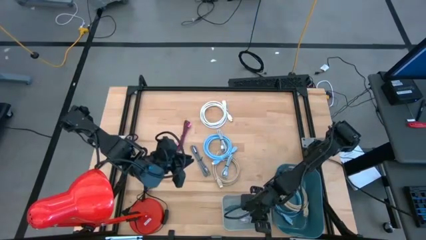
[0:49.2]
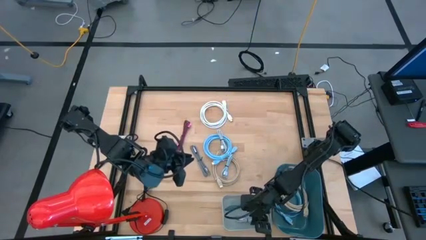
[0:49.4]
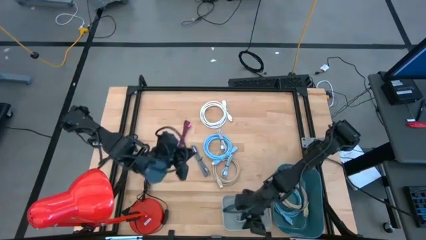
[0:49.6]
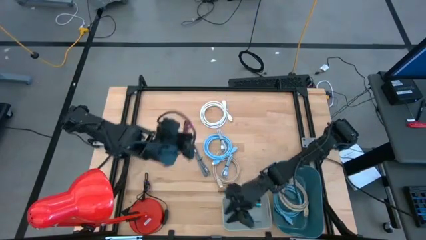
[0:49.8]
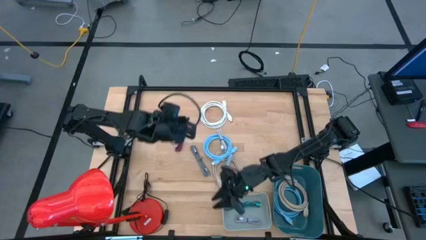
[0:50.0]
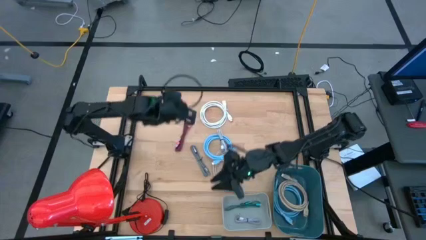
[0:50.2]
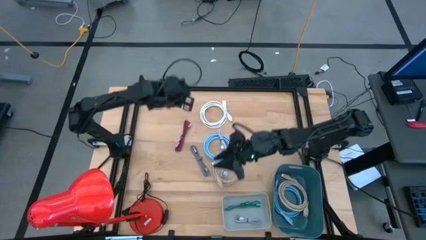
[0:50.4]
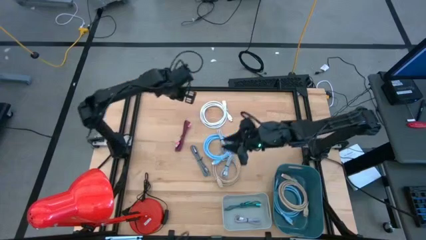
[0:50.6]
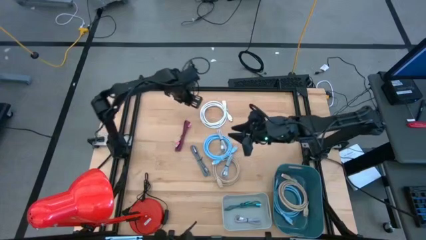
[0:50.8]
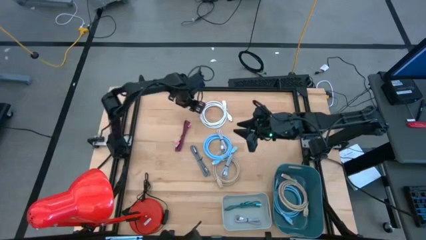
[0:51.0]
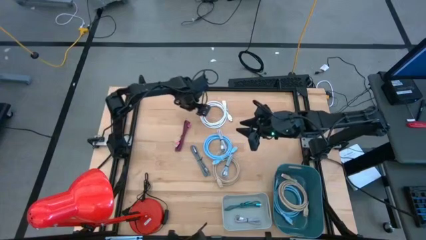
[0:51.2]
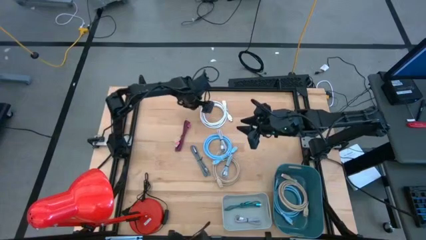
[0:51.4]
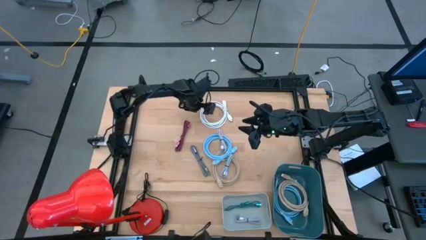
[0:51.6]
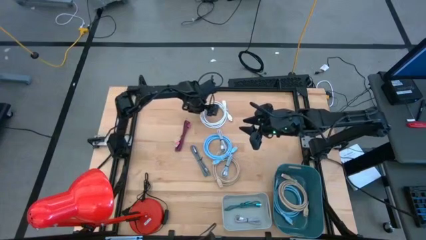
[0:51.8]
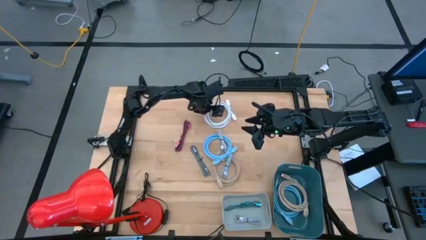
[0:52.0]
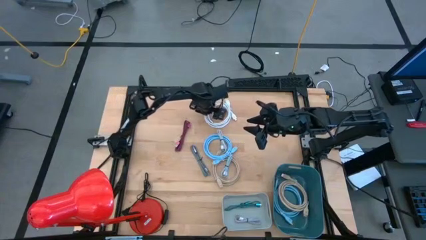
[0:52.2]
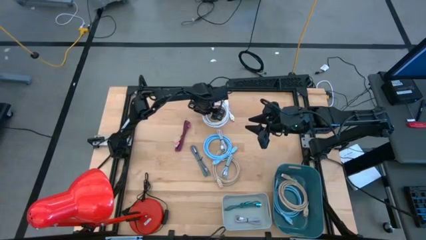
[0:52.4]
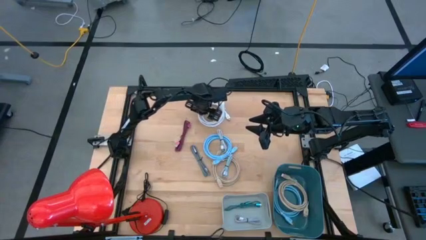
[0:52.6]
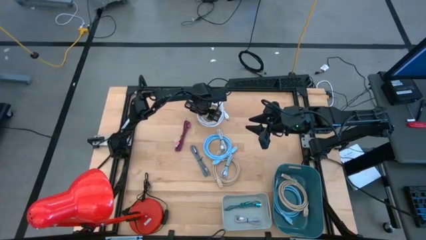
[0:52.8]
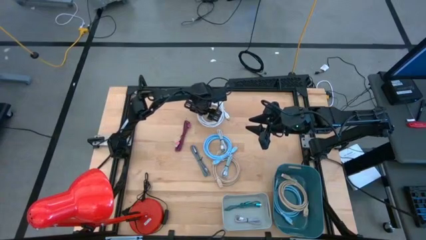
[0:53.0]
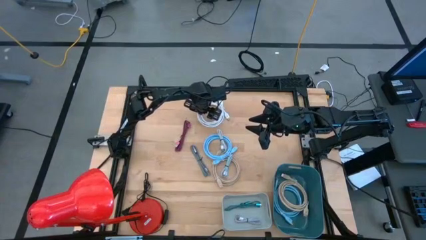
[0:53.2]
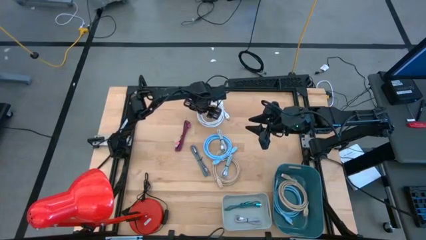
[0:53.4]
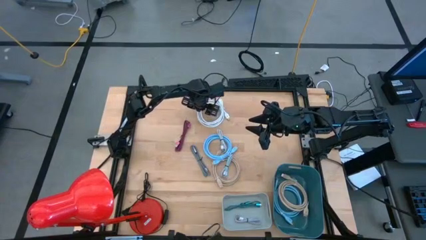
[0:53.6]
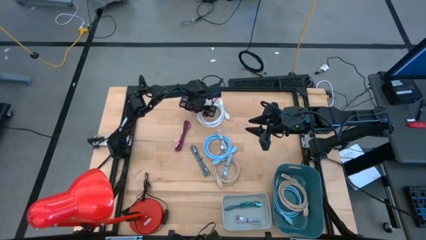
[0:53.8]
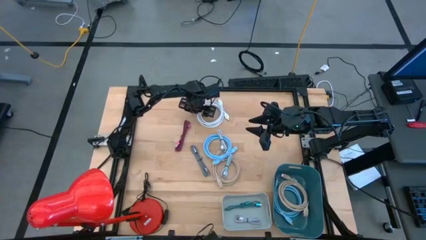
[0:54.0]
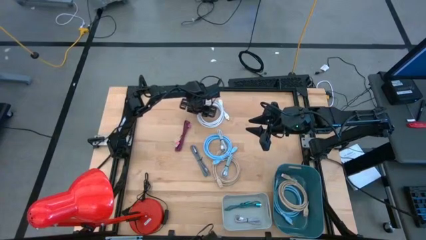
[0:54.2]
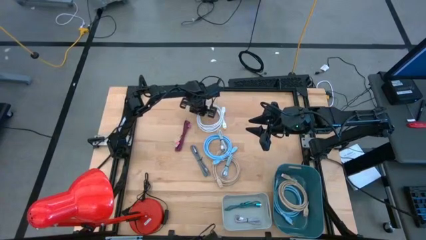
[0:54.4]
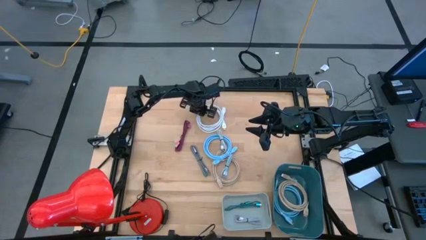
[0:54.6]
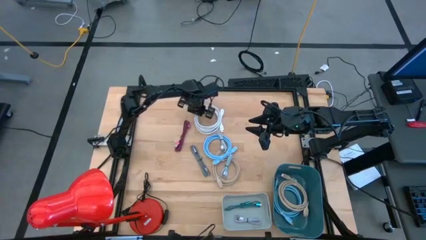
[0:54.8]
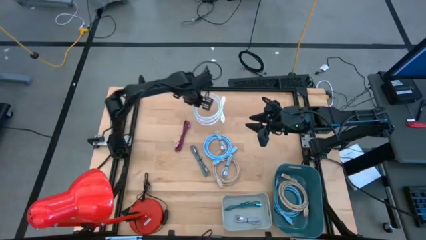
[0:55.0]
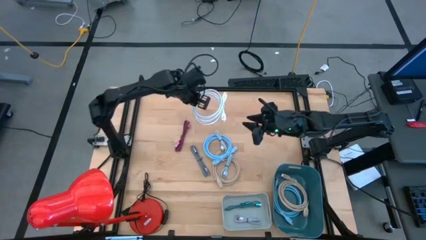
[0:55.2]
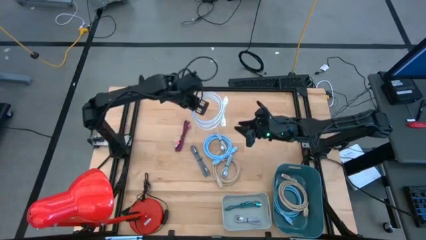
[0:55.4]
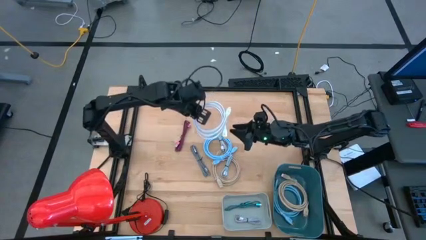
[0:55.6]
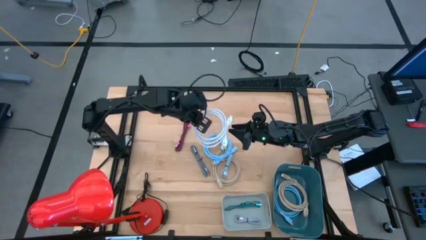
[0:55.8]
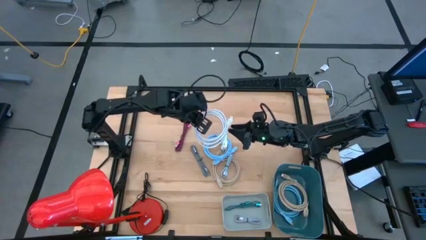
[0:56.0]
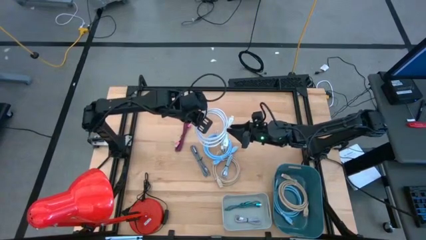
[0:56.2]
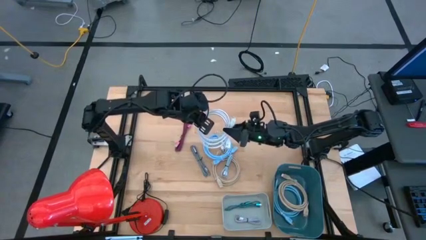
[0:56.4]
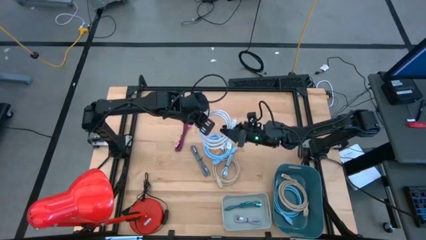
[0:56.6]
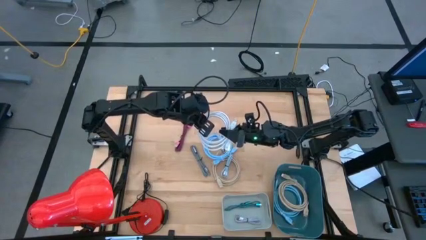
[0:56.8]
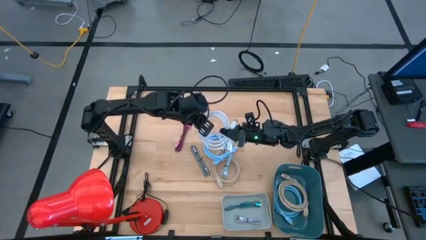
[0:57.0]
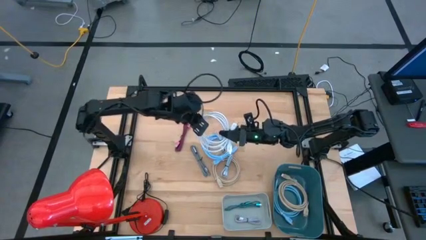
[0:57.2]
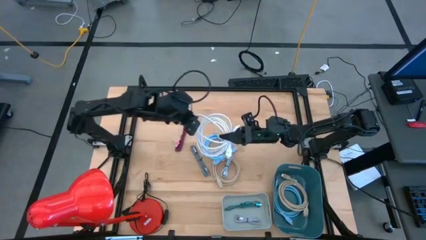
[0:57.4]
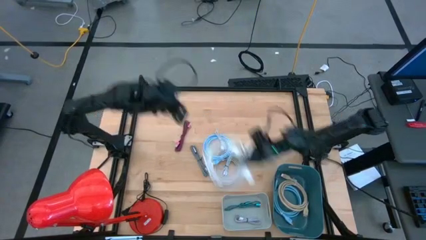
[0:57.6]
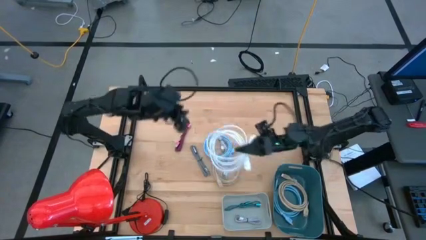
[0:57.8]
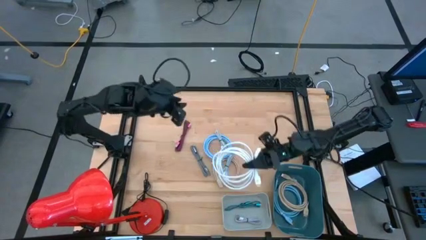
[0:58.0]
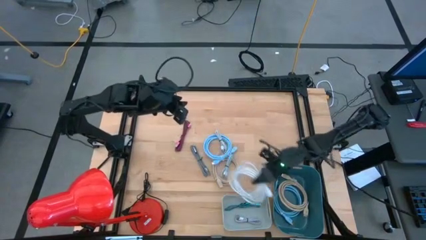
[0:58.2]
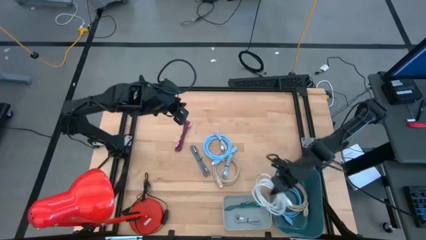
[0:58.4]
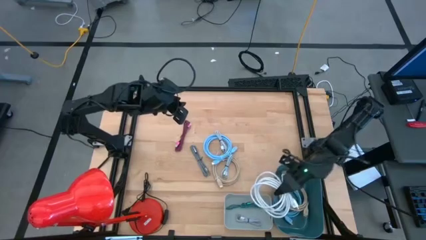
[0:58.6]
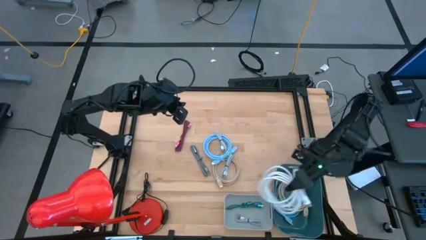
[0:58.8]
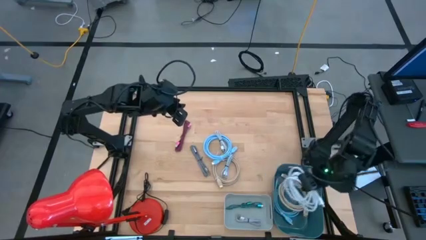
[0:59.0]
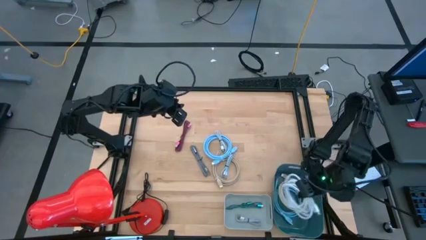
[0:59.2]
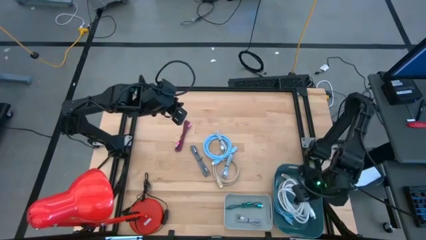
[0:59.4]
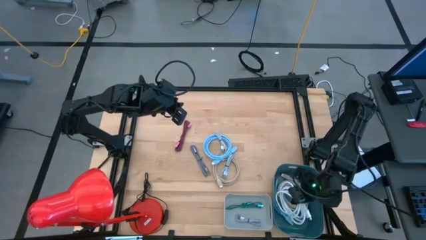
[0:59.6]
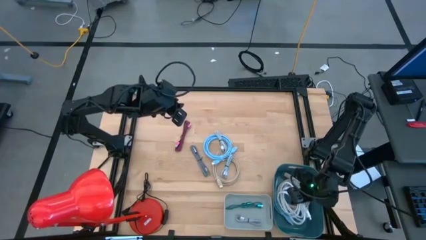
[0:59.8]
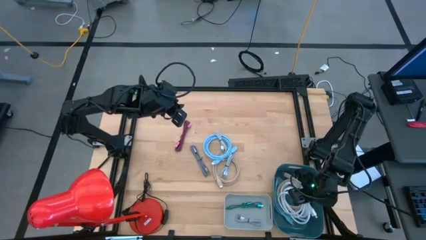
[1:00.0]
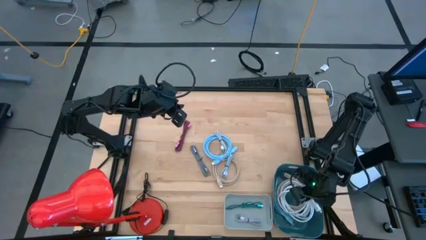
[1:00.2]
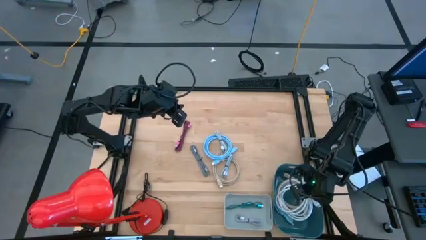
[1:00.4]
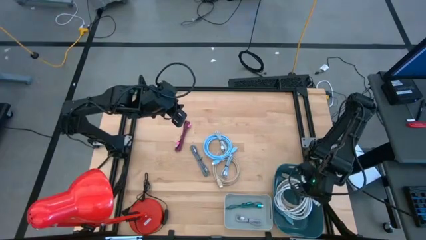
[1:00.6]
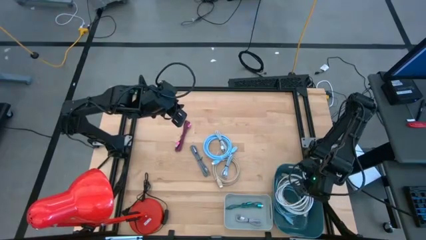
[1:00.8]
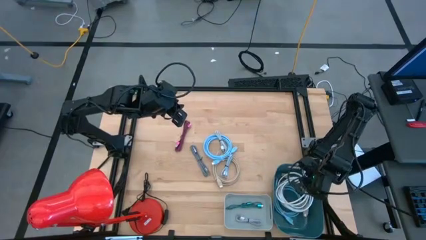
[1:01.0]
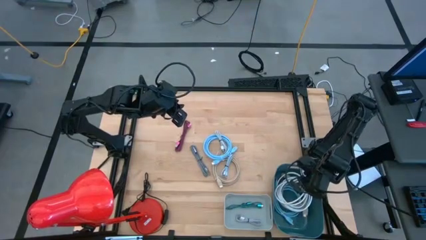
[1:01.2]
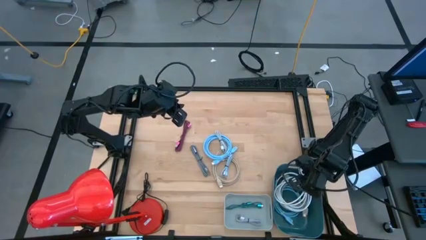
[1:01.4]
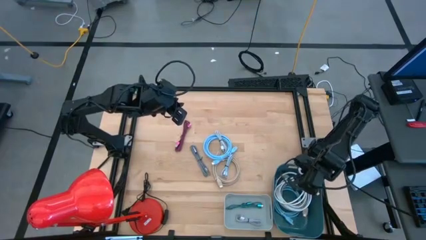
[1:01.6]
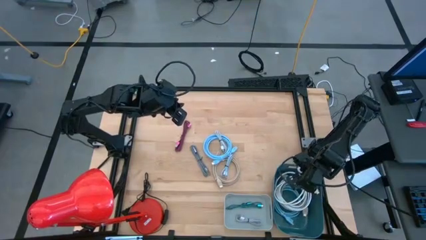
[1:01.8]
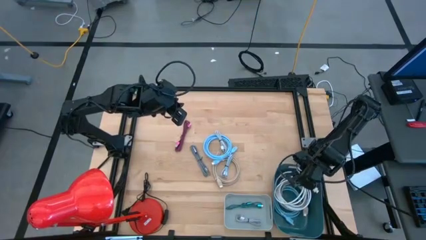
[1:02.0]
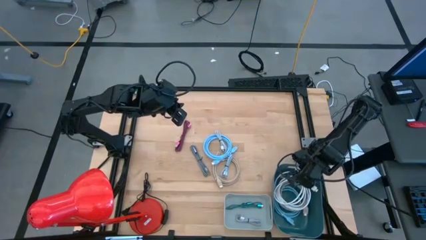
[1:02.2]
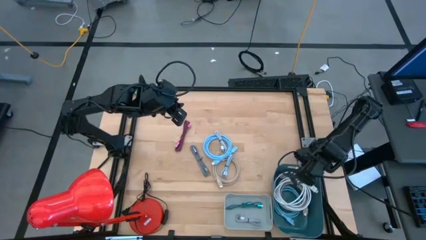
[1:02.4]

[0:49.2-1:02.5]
Task: Pick & Place USB Port
Put the white HDMI cable into the blue bin
